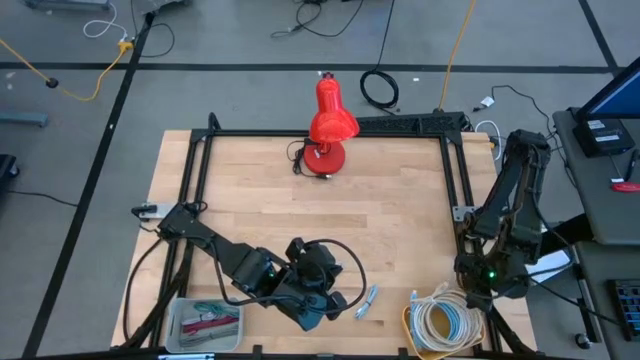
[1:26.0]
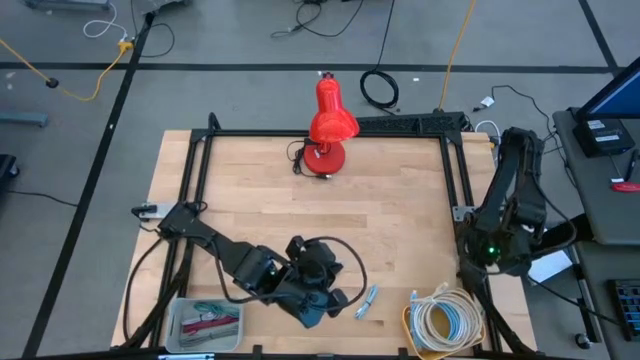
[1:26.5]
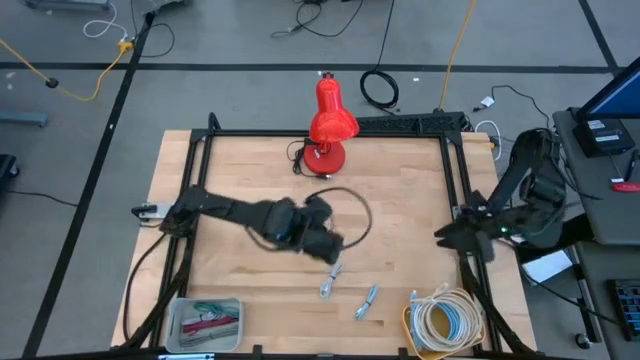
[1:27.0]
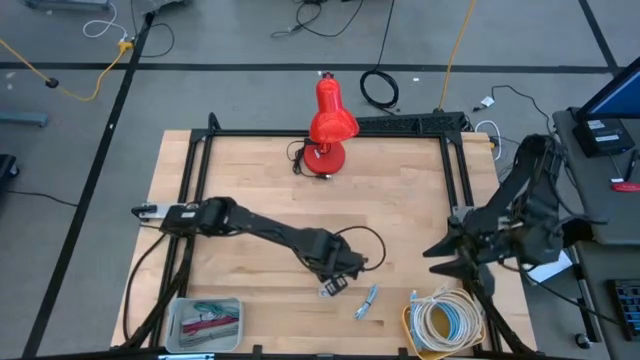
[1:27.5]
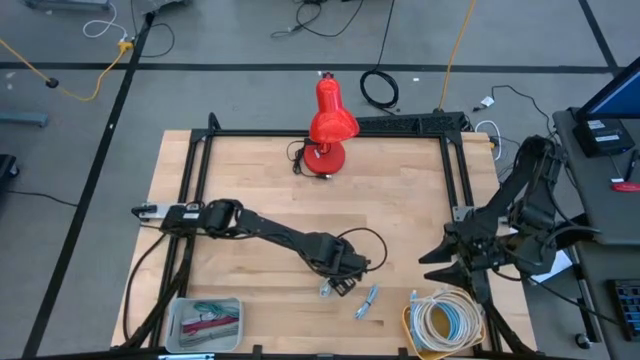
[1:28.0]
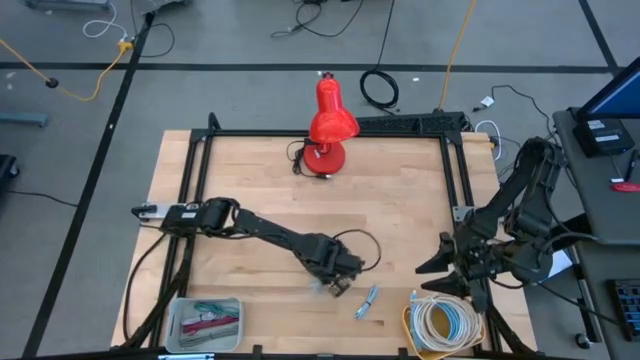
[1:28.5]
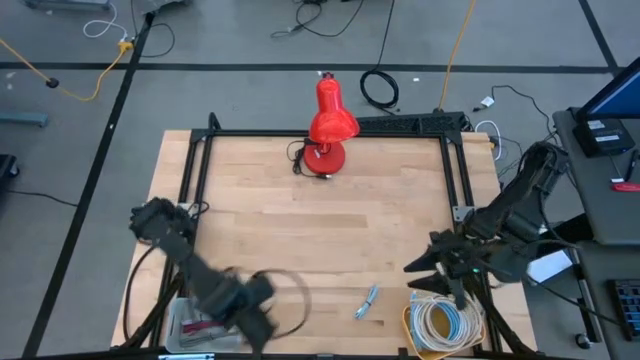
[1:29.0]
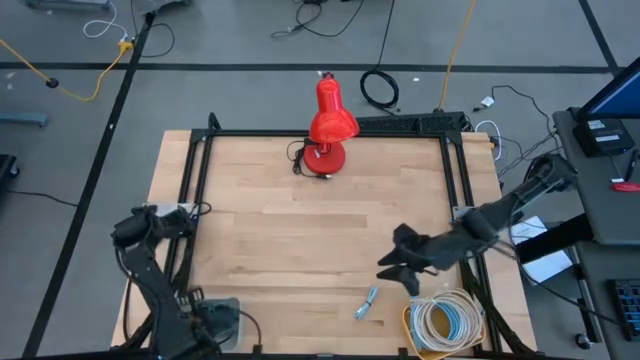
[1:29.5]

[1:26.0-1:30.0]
Task: Pick & Place USB Port
Put the white charger cable into the white bin

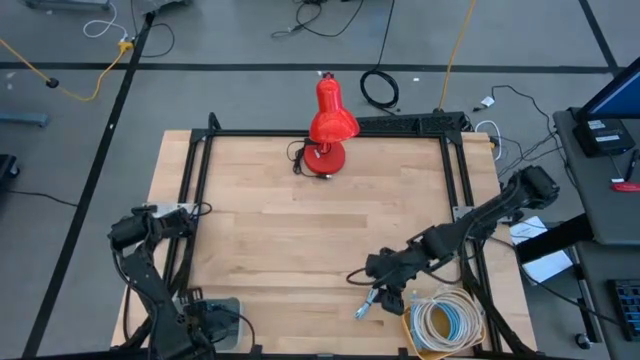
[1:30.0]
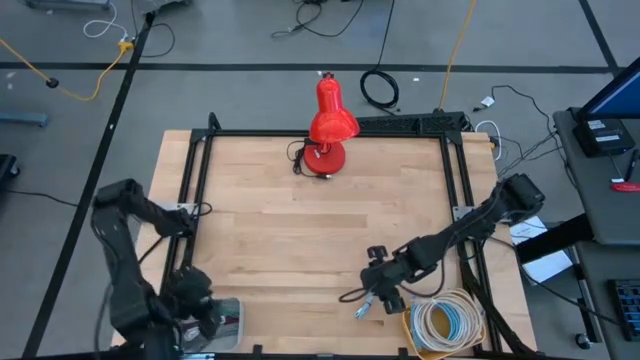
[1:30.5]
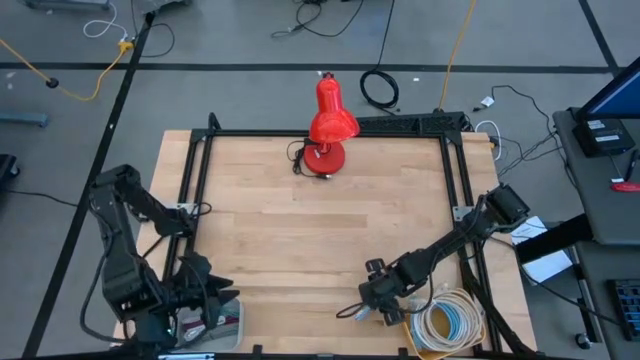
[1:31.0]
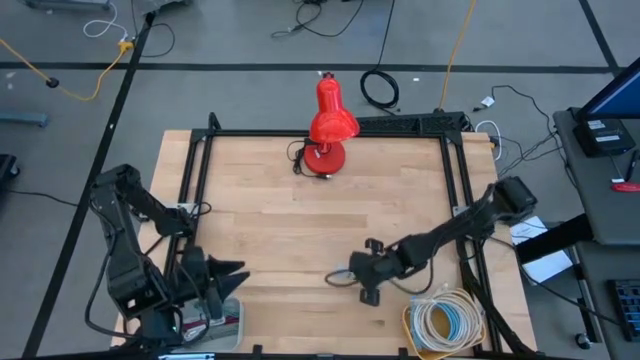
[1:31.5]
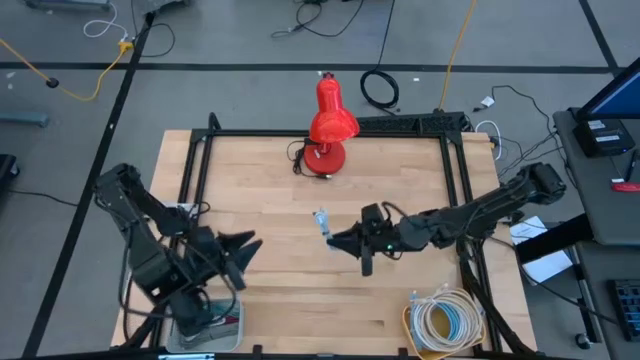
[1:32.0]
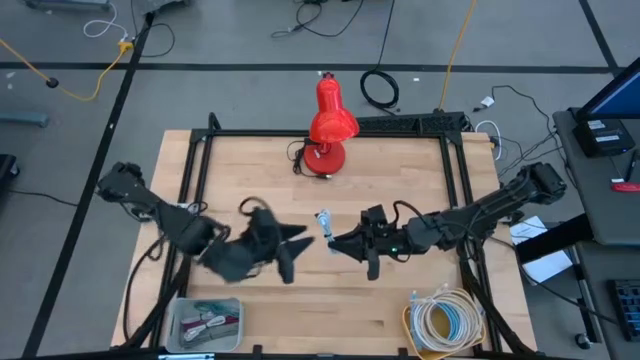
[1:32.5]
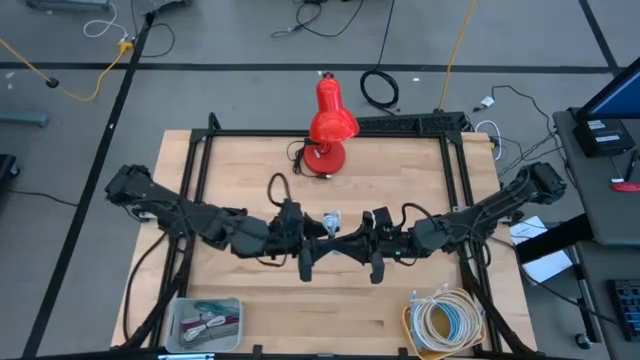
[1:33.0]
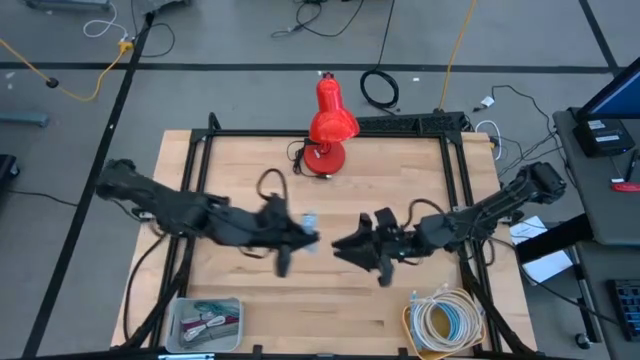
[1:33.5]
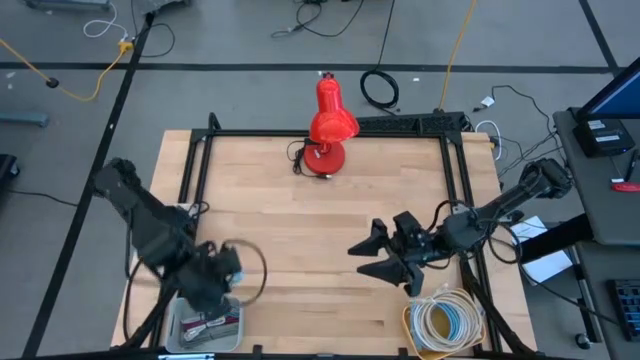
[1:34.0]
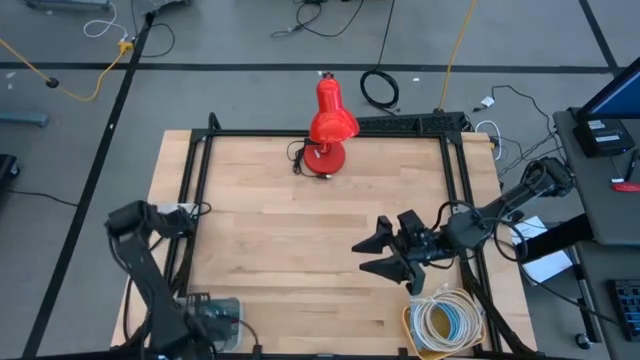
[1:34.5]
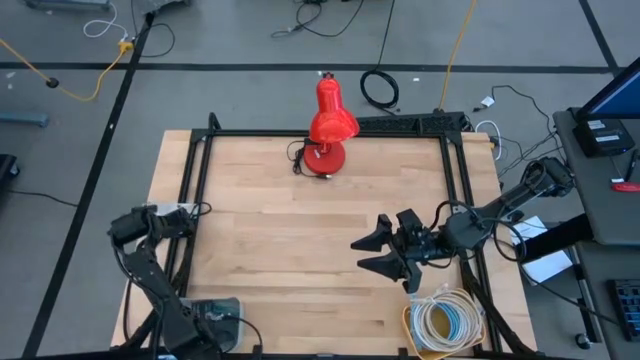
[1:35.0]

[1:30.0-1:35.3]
Put the light blue charger cable into the white bin

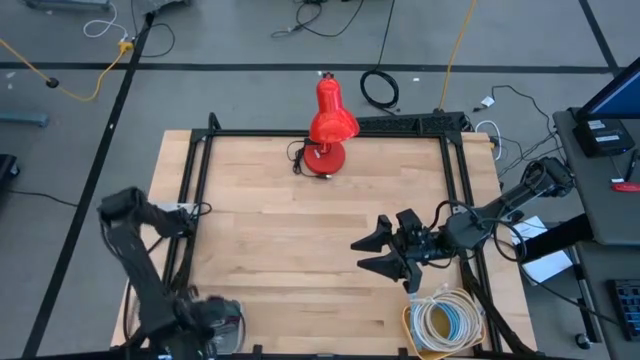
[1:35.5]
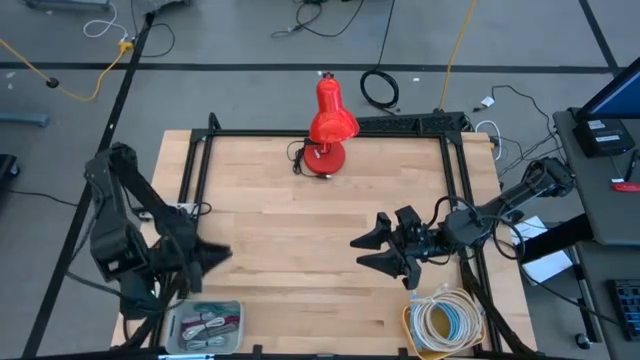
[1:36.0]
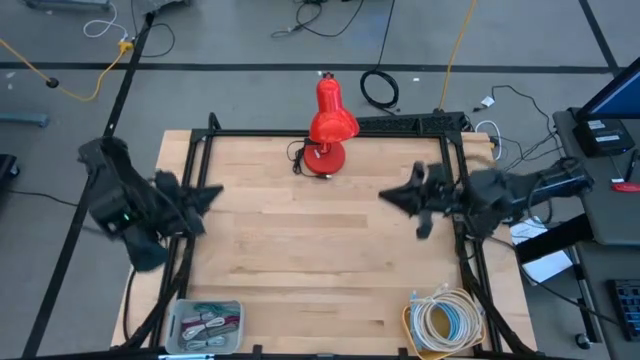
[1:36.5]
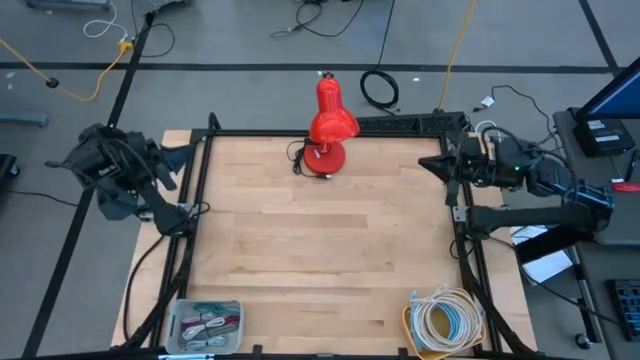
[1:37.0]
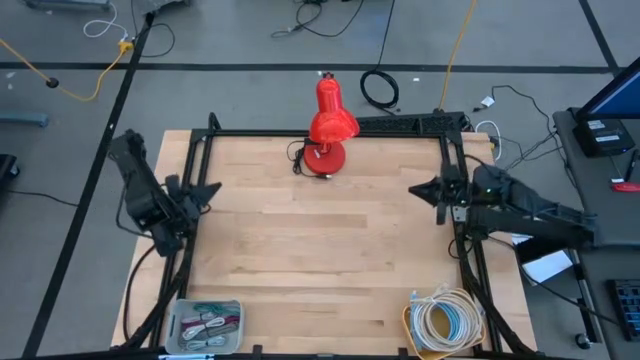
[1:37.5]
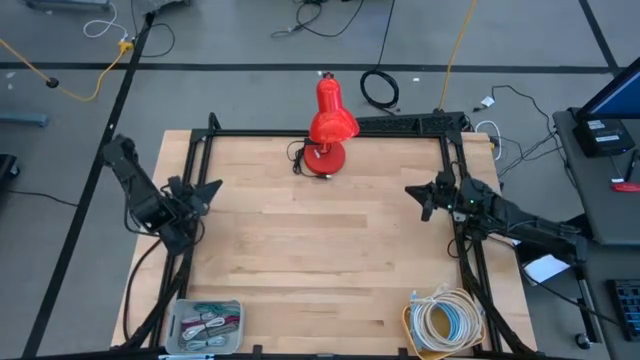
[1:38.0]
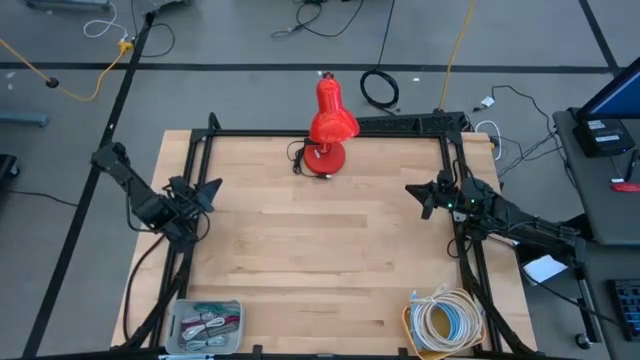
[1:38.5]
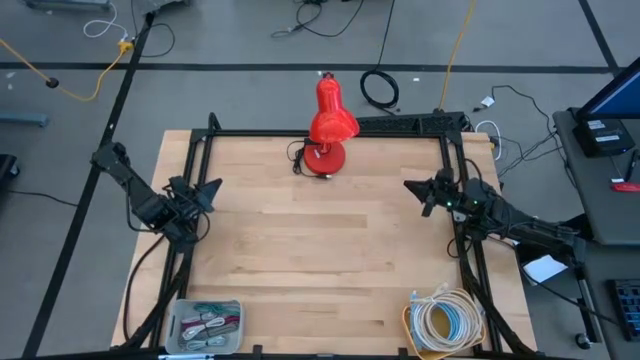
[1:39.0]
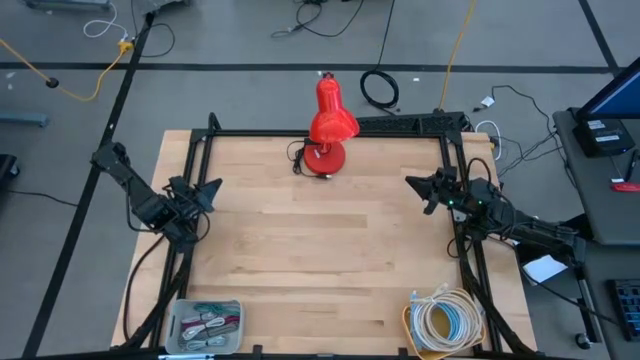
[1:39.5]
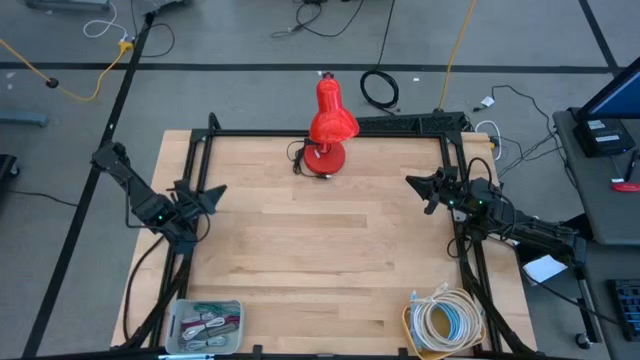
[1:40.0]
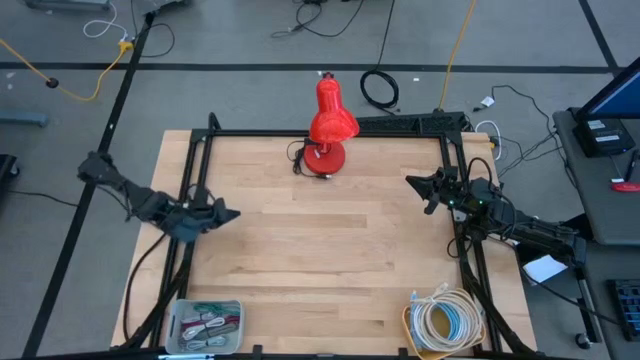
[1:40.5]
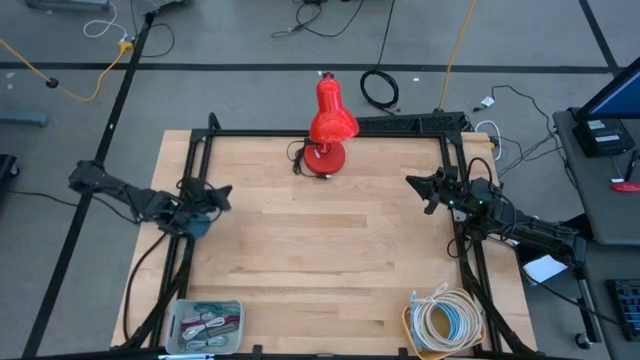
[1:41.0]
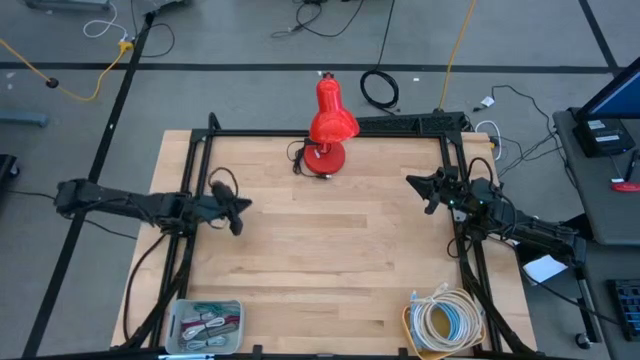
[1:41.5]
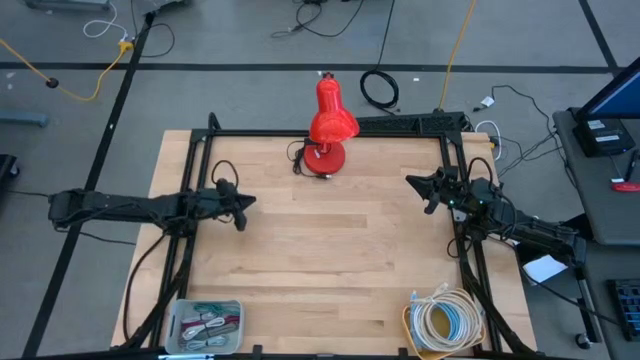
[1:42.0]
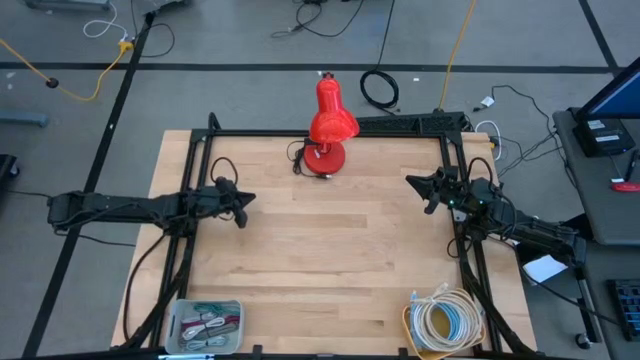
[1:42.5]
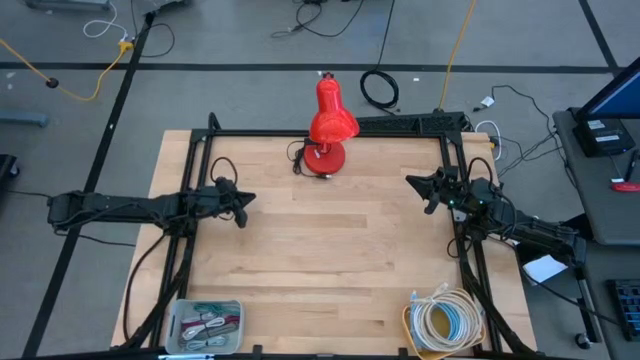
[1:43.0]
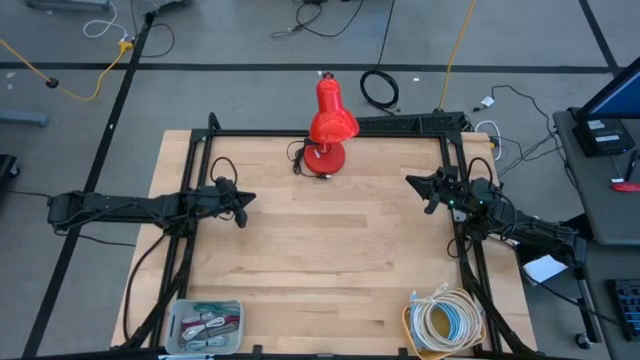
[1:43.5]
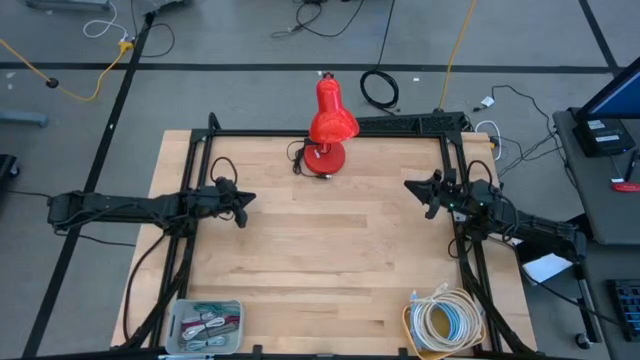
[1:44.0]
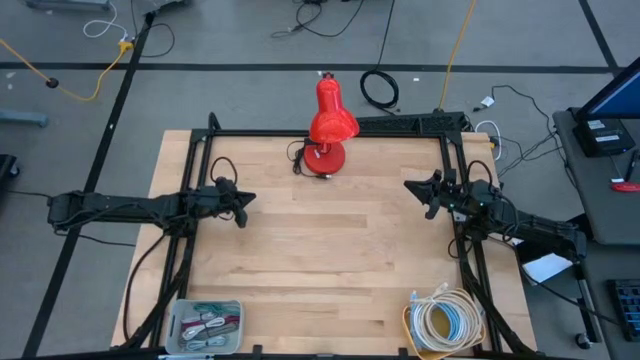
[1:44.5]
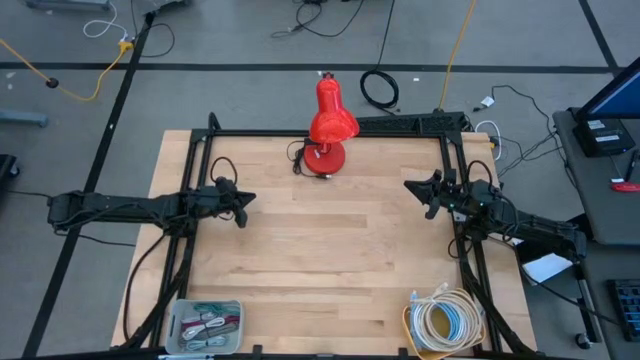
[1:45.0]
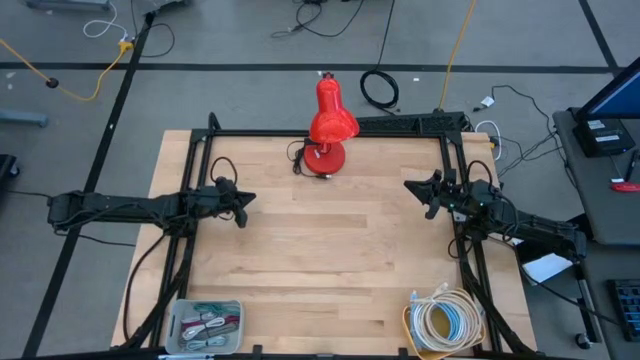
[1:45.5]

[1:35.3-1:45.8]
Return to Home Position

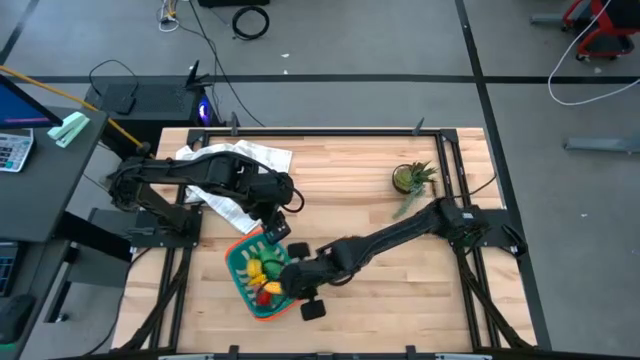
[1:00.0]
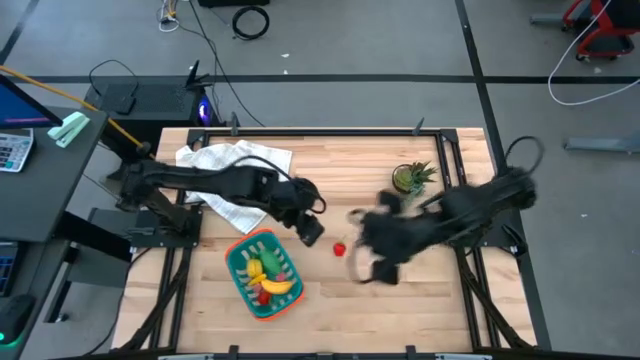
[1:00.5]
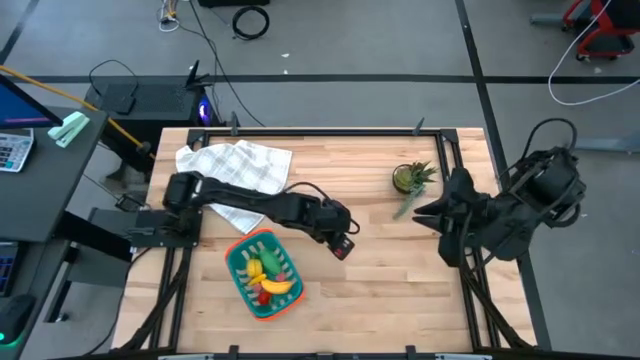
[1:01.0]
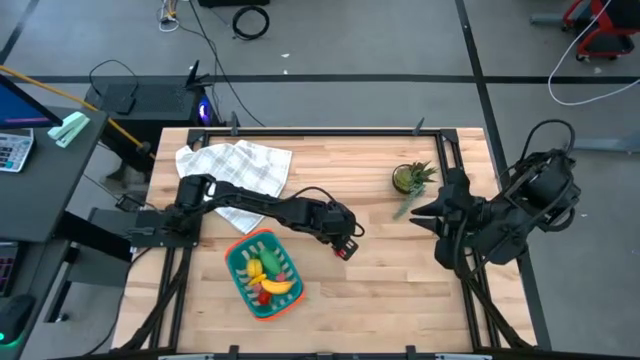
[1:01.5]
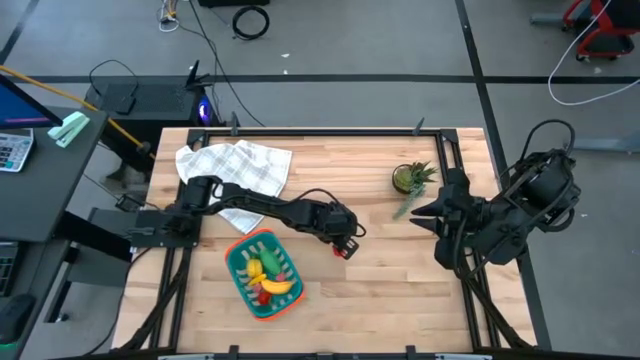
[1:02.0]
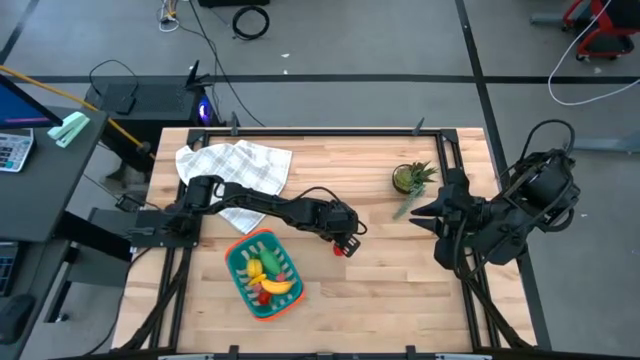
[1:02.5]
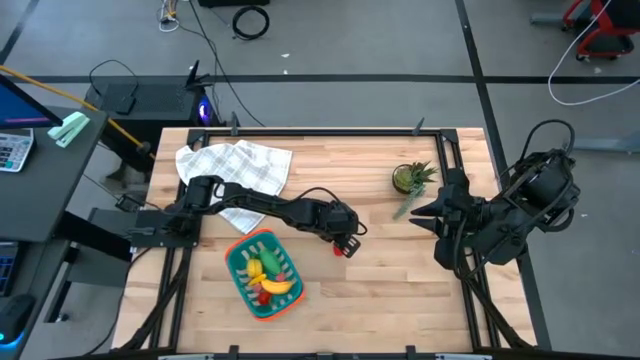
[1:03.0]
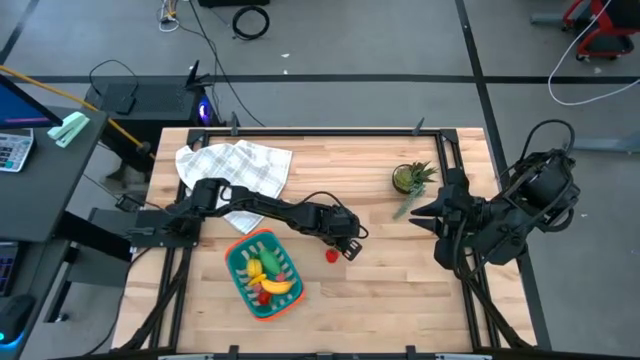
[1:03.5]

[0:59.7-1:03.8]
Task: Pick and placing Produce into tupperware
Put the red strawberry into the blue basket
